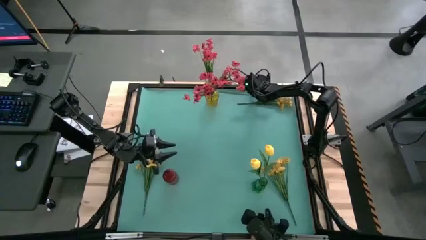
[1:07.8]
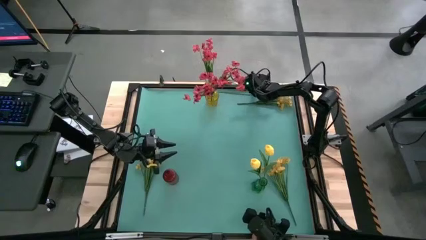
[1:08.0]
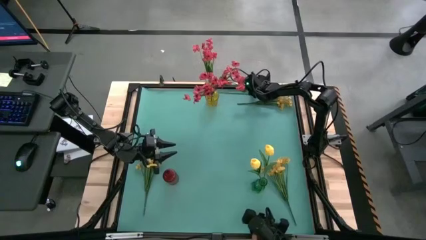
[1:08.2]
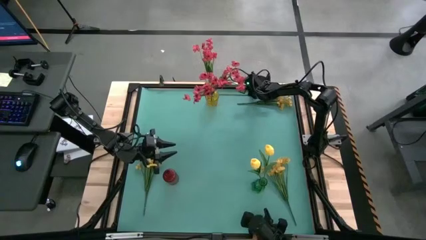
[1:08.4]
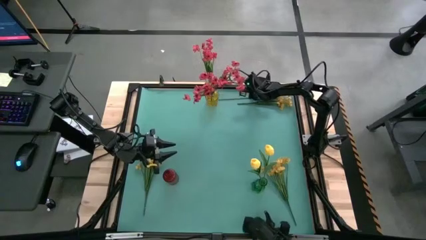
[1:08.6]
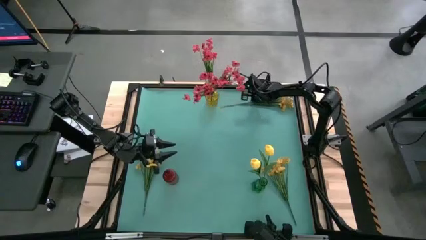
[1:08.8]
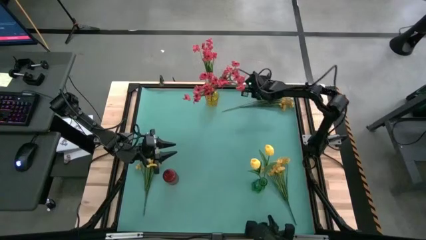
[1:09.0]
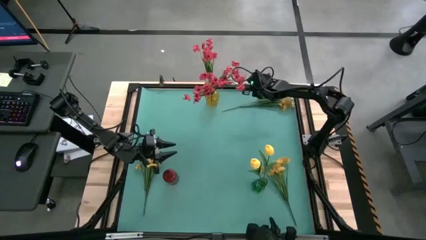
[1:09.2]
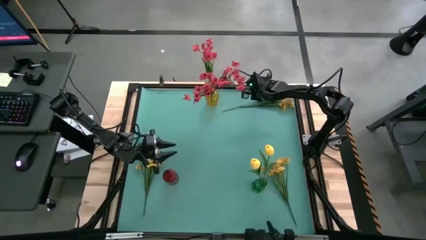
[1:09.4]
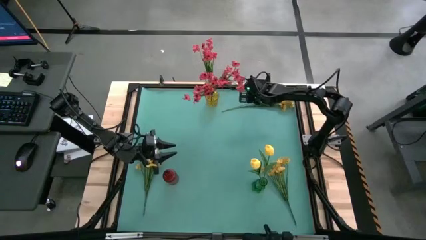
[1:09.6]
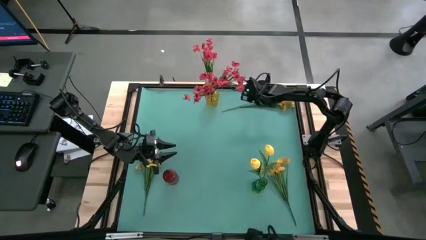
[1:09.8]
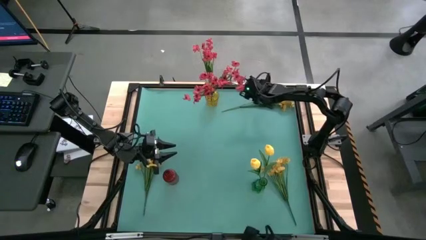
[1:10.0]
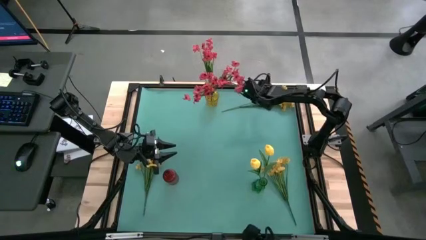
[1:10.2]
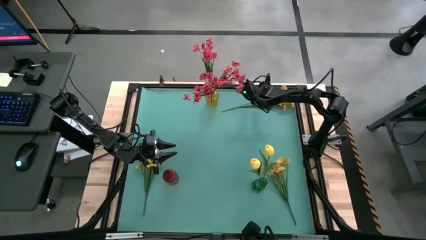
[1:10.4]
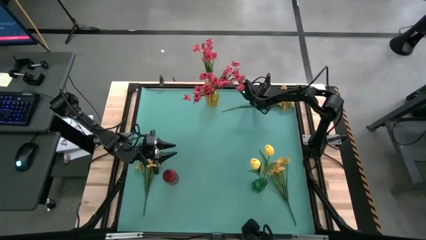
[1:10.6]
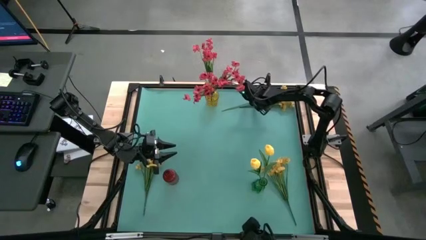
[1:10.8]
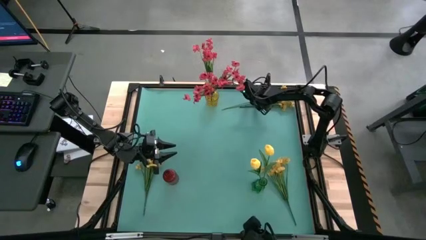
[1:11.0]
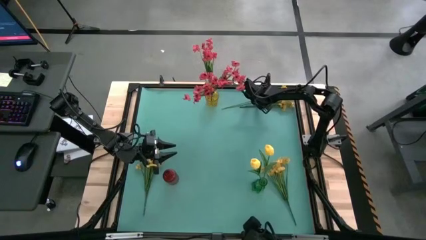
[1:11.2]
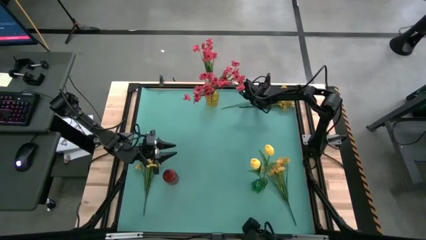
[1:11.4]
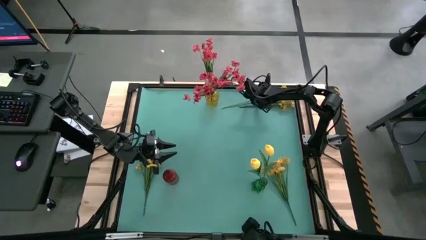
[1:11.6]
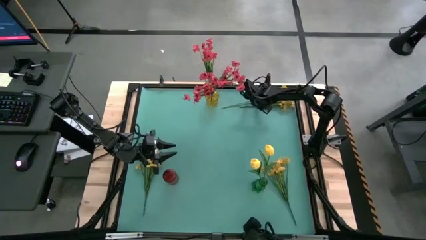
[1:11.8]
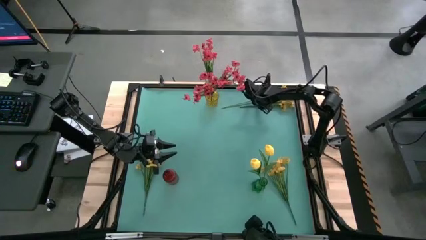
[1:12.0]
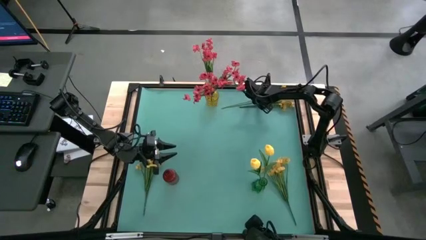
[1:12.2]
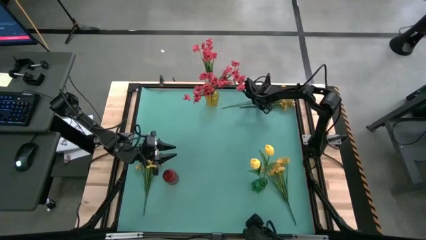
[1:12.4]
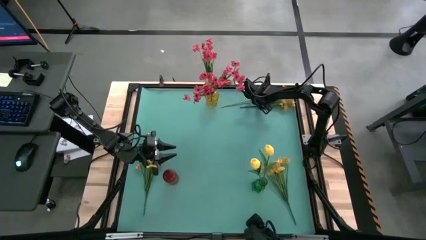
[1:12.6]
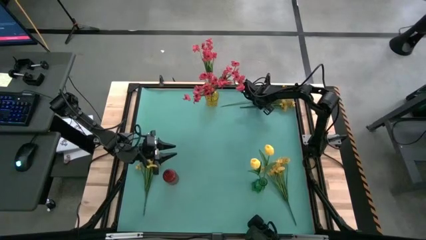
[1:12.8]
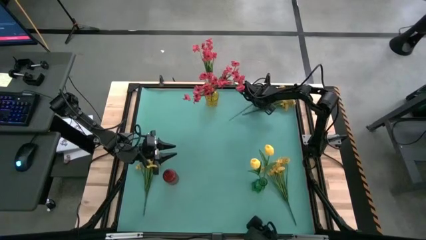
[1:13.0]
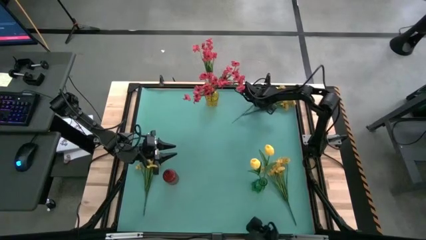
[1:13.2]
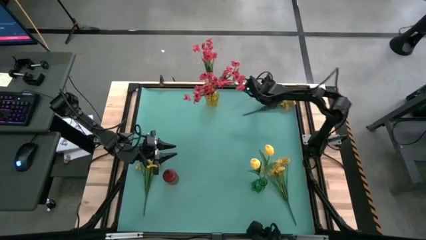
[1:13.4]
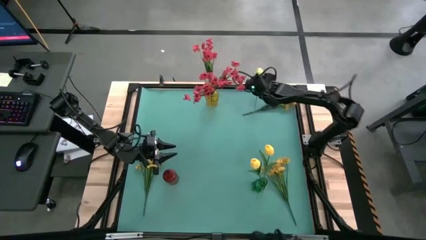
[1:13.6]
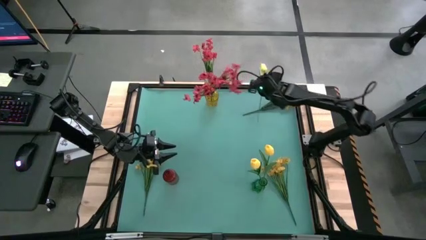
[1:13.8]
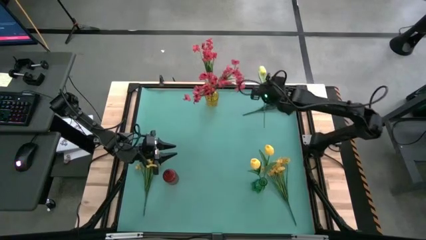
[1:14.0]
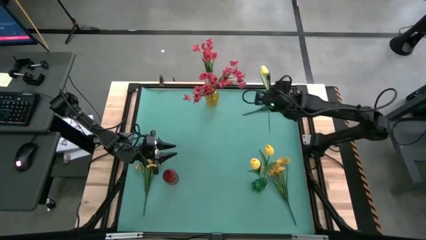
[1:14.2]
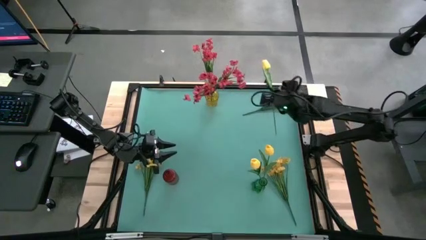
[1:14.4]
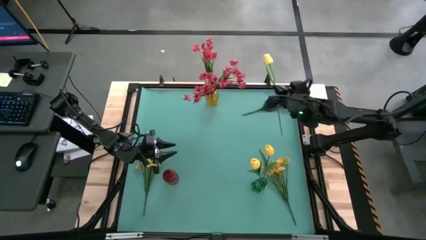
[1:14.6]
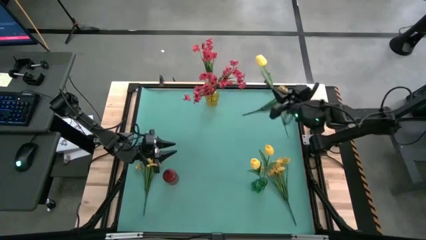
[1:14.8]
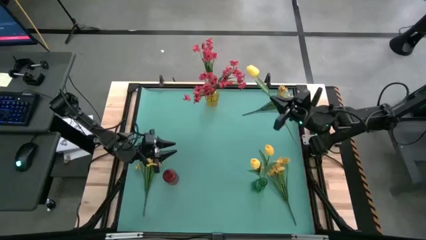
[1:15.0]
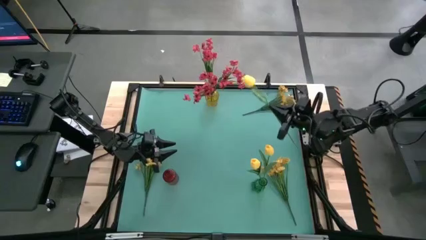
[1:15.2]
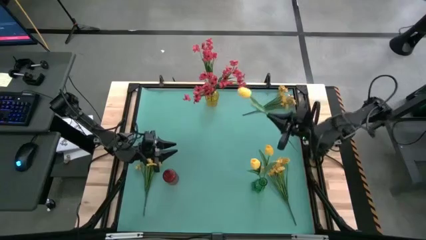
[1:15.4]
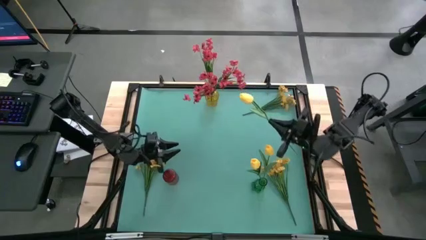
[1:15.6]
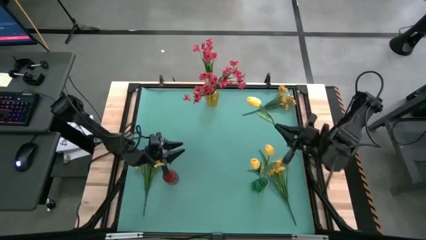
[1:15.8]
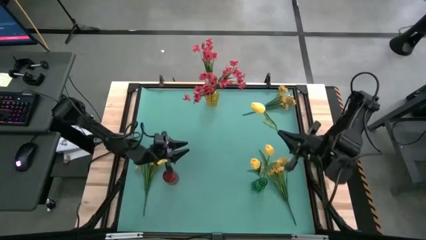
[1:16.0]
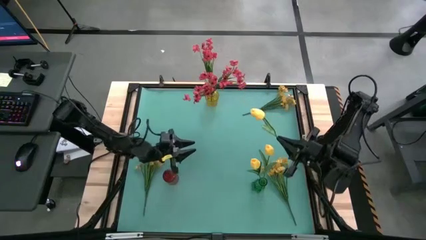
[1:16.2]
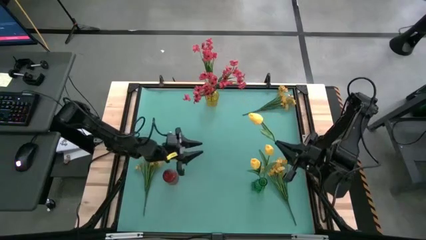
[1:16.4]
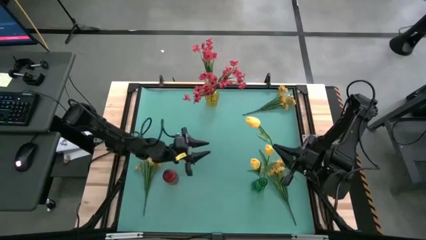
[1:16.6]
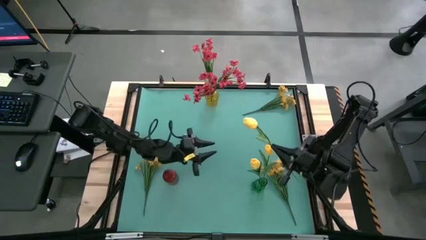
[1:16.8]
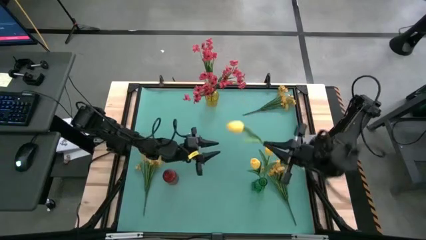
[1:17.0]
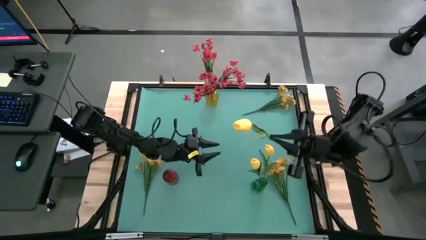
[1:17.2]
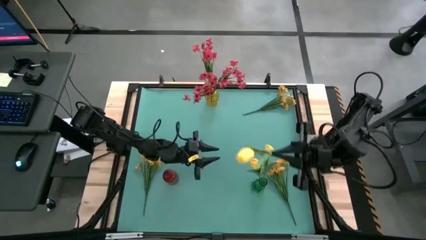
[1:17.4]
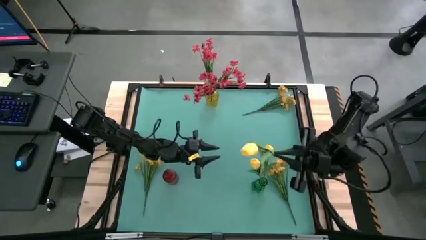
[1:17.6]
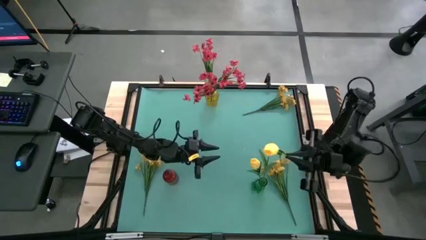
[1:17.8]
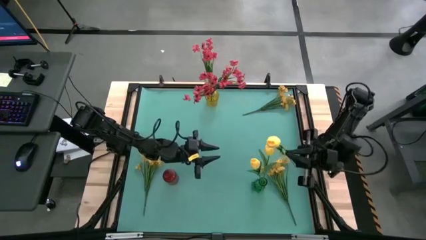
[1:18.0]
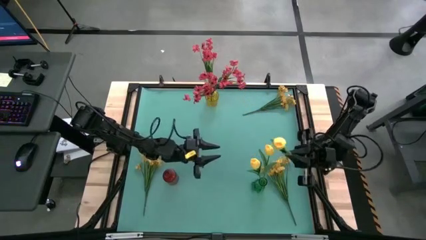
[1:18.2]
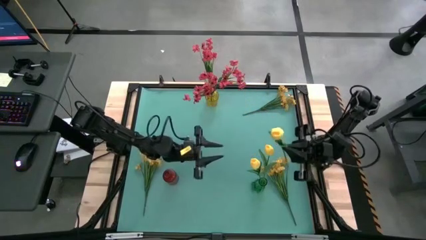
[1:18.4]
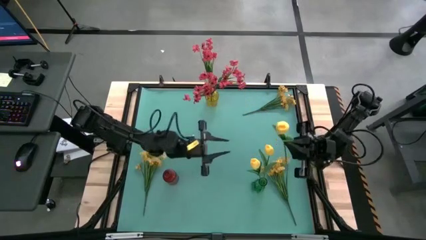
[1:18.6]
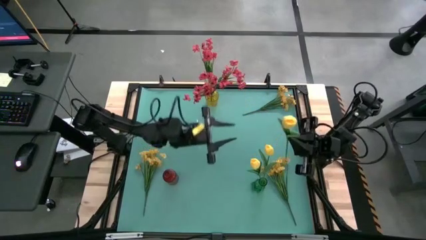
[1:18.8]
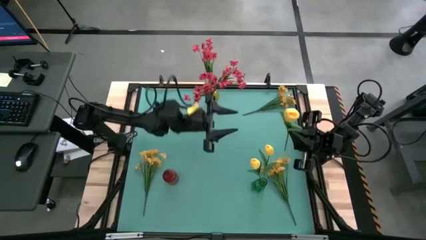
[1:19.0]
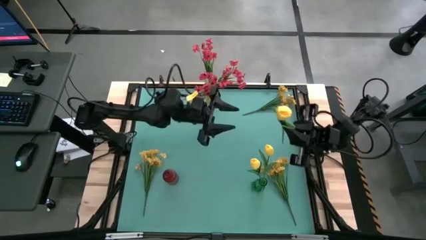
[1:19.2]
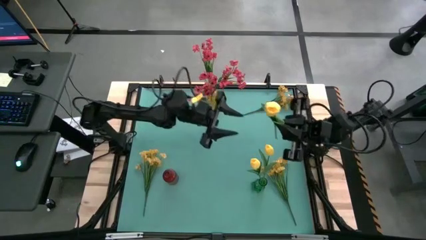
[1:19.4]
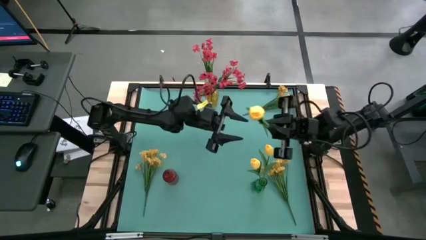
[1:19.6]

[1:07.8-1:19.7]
Task: Sort flowers into vase by color
Put the yellow tulip into the green vase
